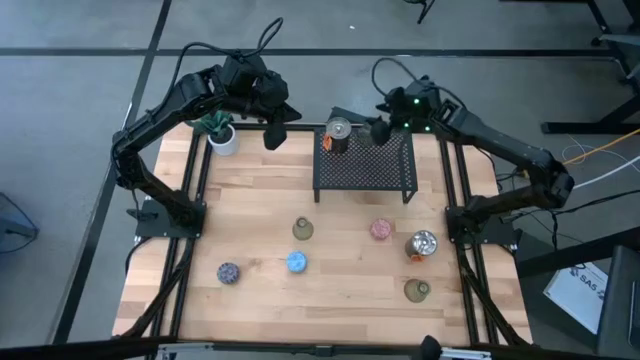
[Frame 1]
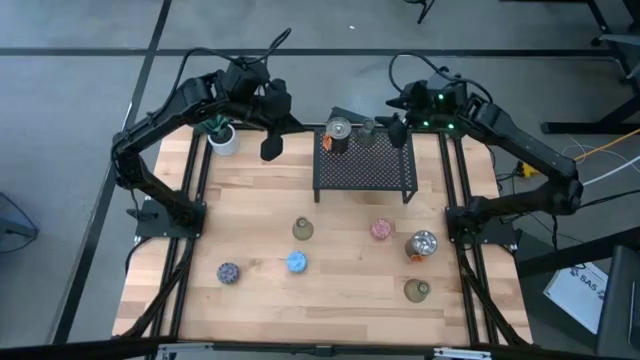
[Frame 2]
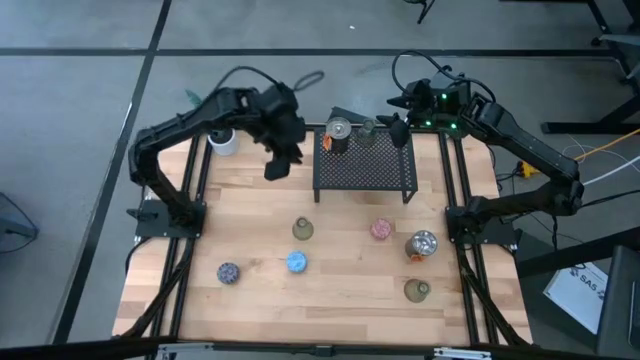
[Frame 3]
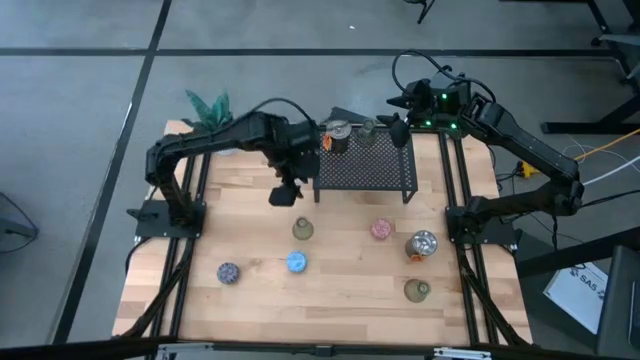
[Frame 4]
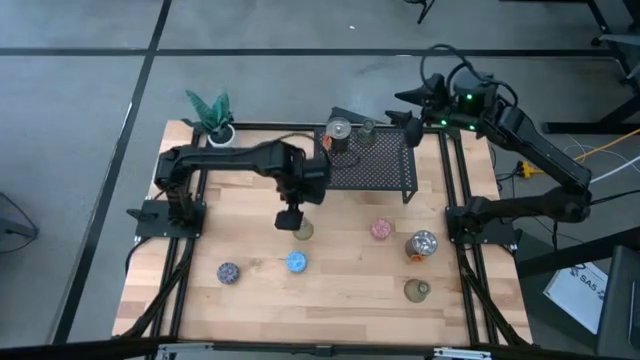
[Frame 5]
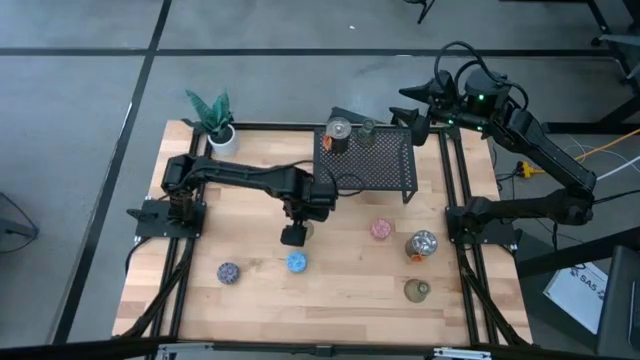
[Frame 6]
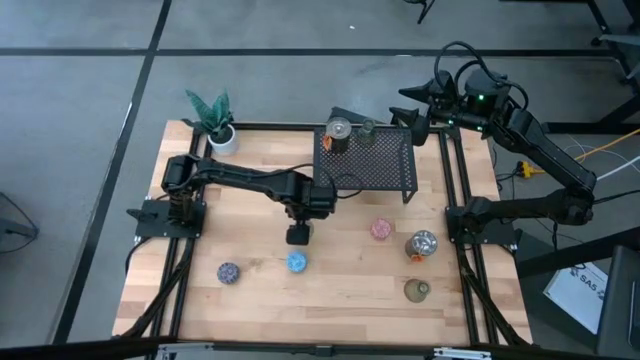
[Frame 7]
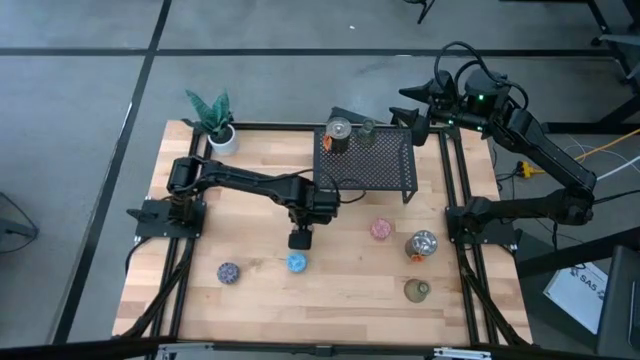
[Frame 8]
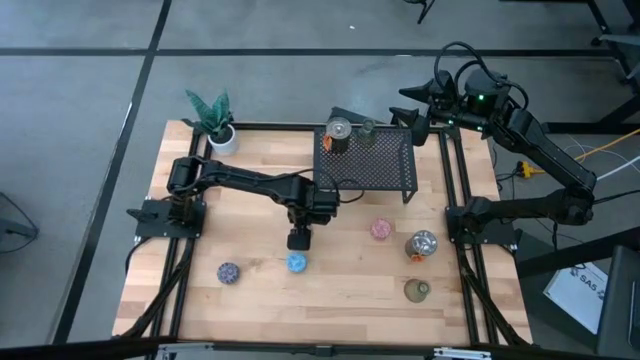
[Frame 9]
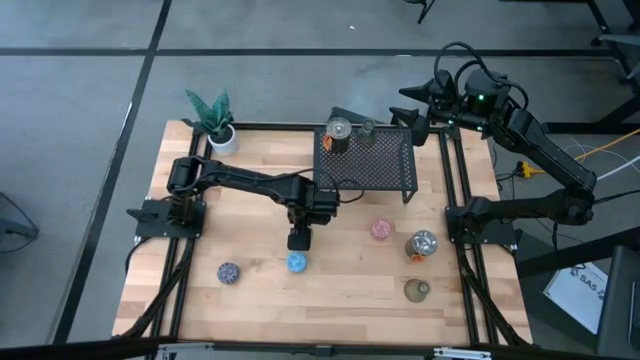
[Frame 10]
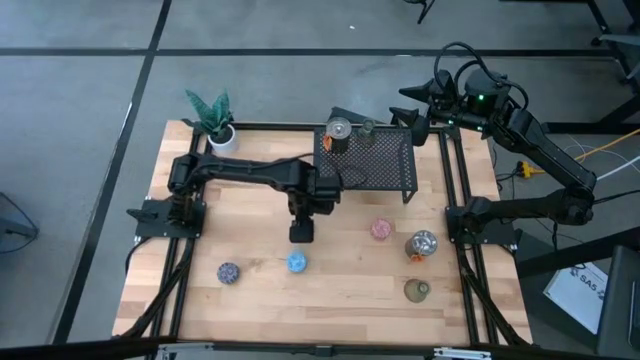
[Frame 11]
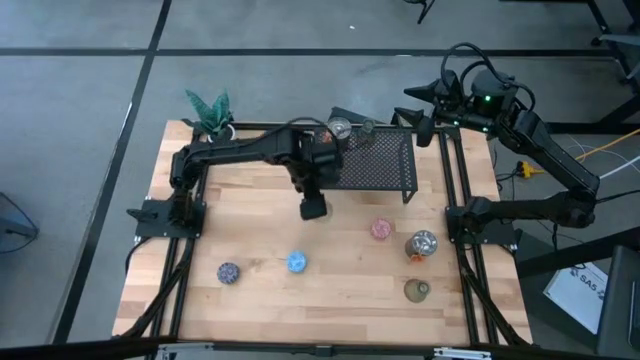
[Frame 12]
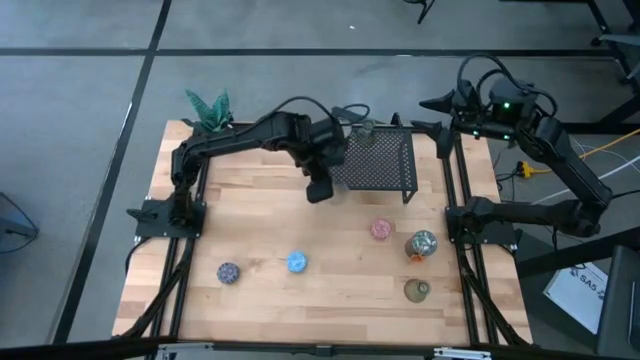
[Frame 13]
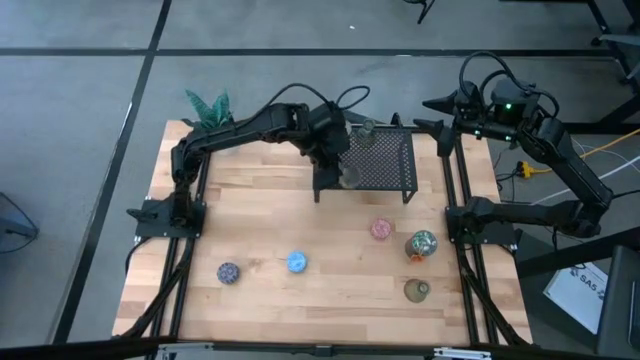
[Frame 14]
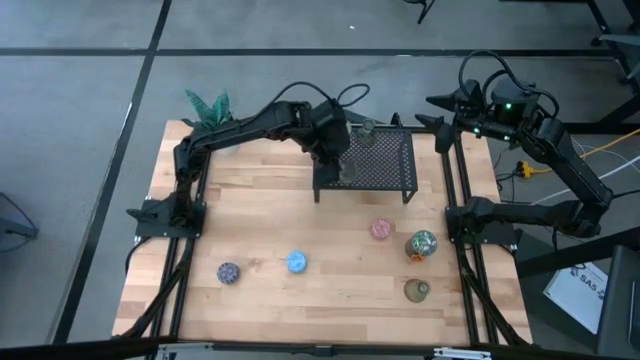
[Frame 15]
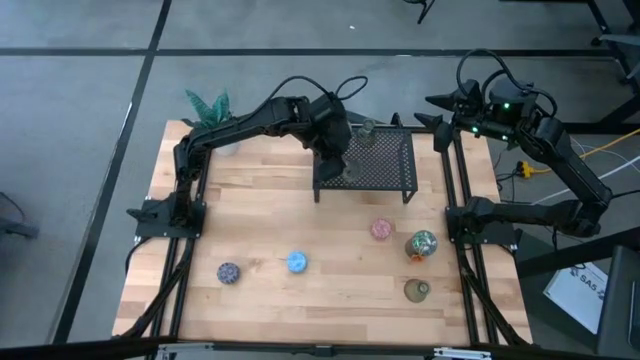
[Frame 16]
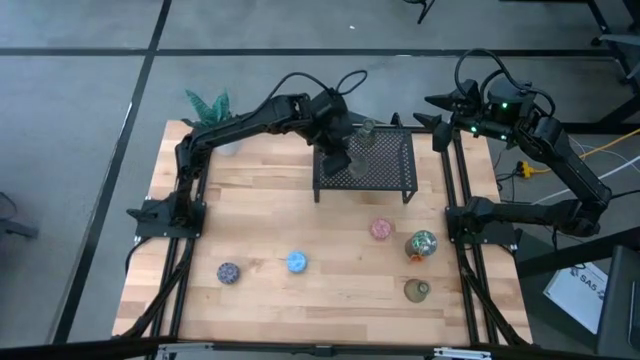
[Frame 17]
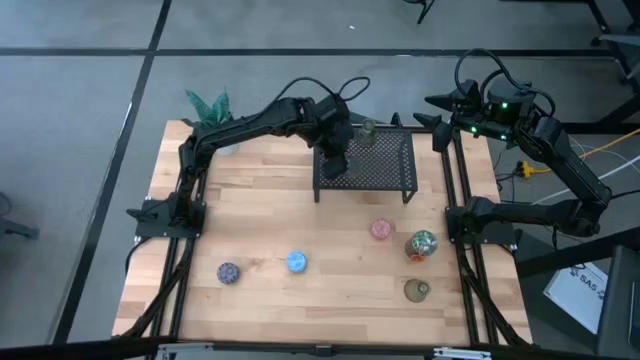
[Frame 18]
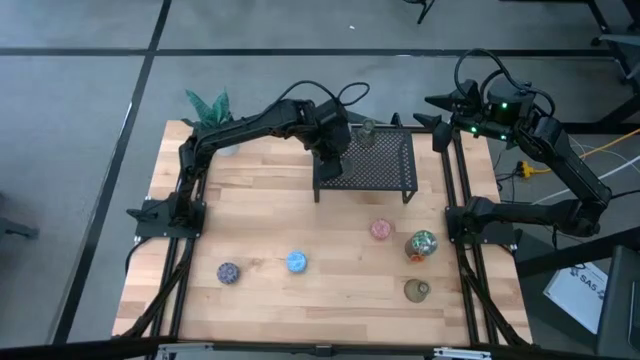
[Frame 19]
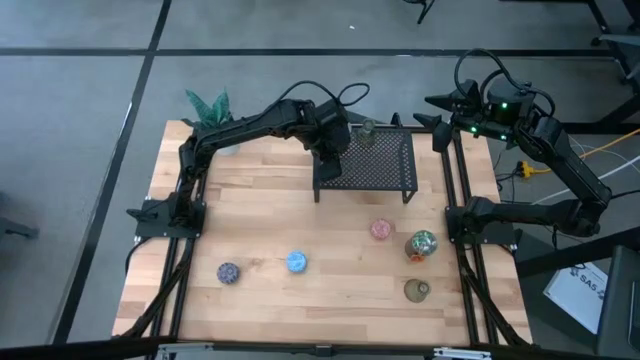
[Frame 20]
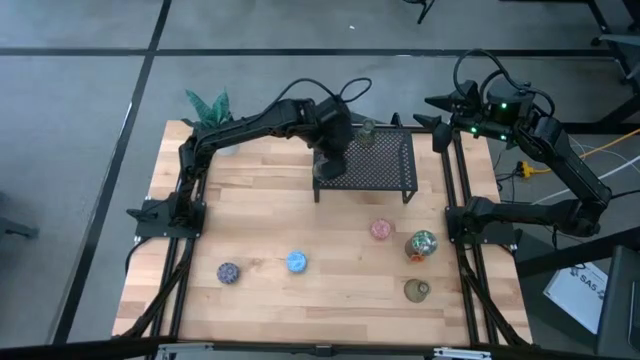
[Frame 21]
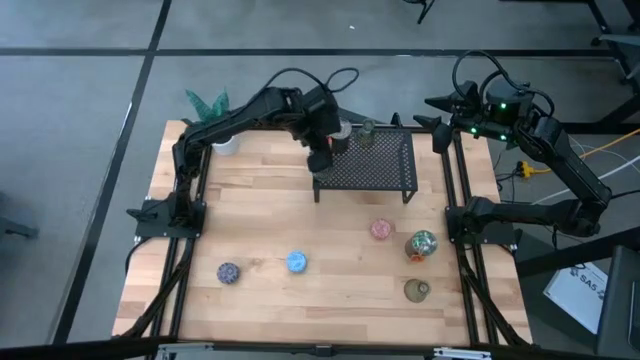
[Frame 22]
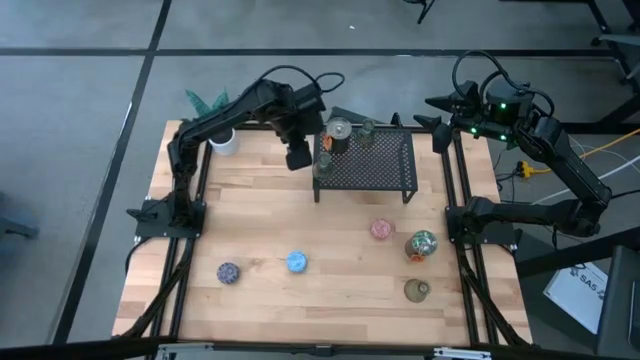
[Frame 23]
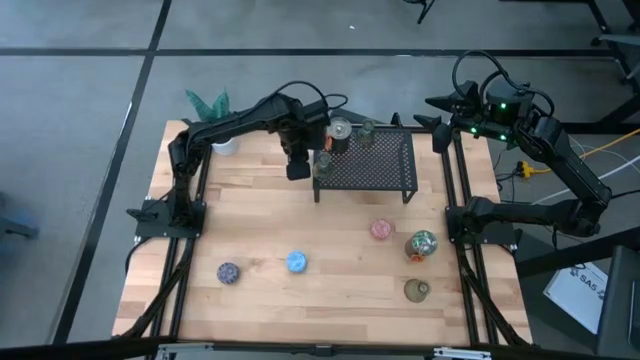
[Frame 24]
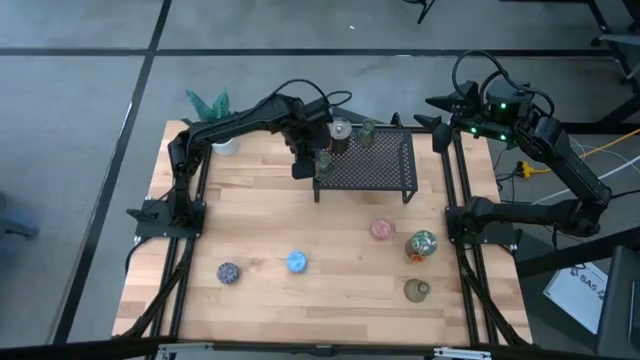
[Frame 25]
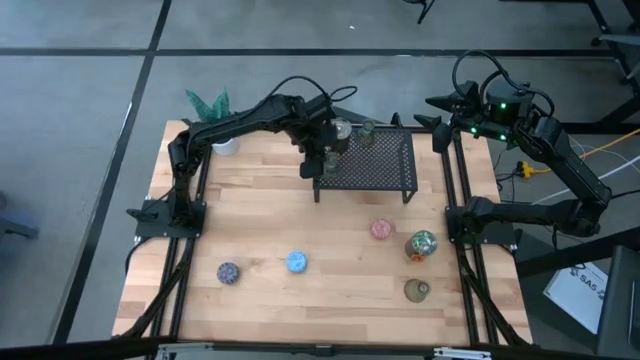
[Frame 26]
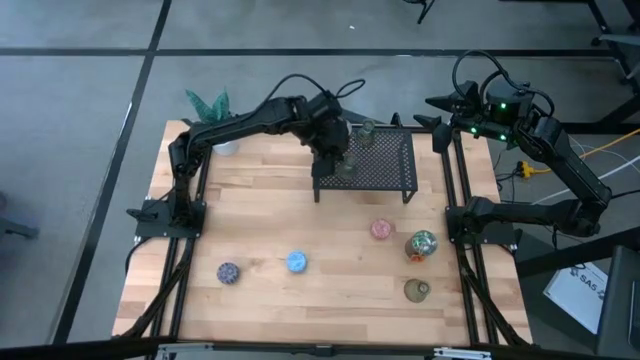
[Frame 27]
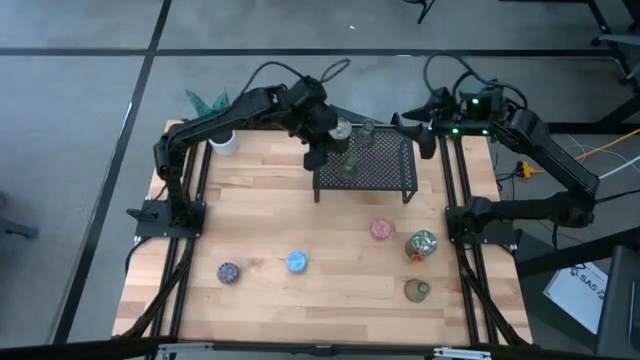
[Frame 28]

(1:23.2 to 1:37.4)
Task: Pick & Place candle stick holders
Put the top green vase candle holder on the shelf aligned with the other green vase candle holder

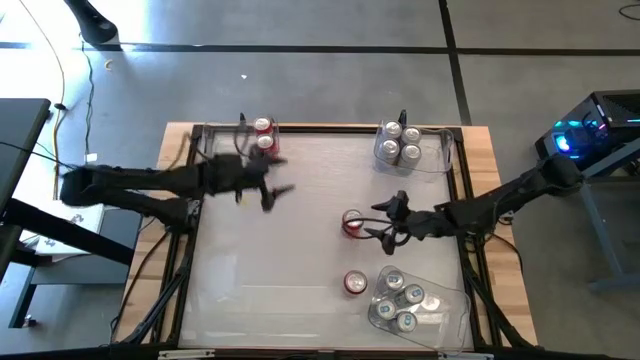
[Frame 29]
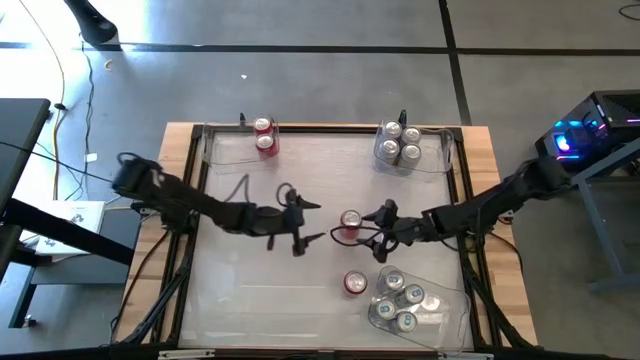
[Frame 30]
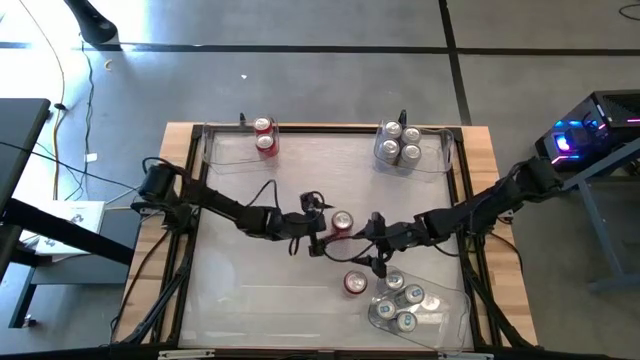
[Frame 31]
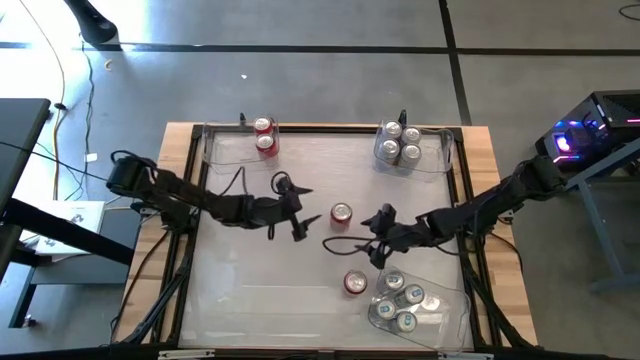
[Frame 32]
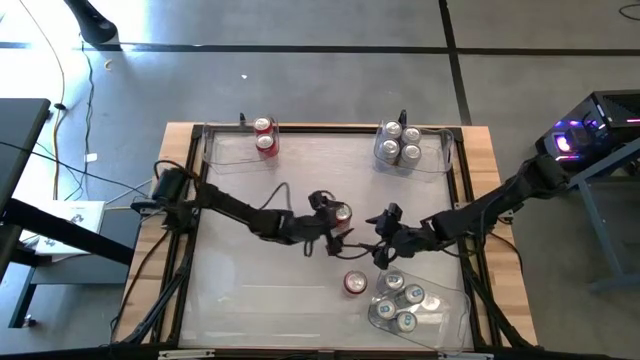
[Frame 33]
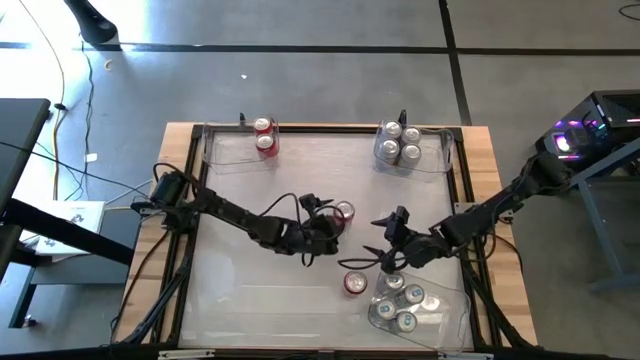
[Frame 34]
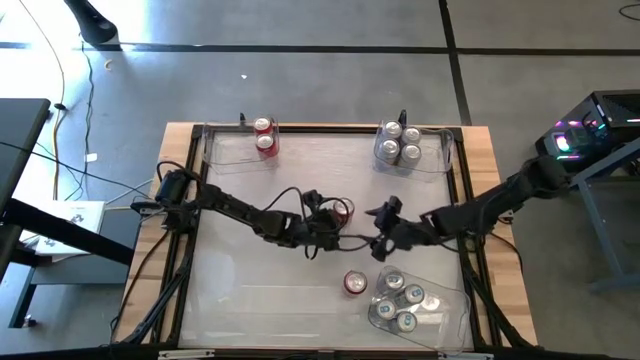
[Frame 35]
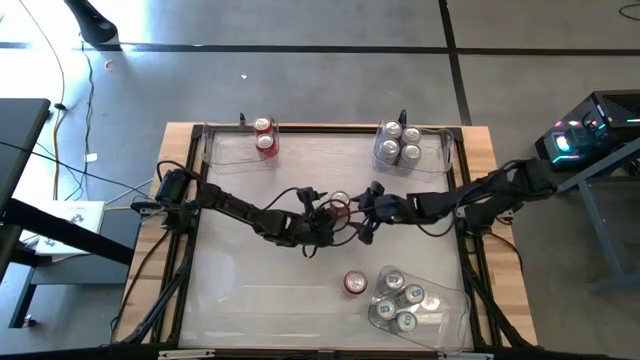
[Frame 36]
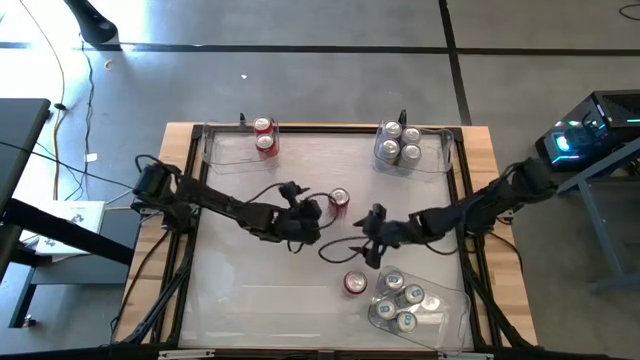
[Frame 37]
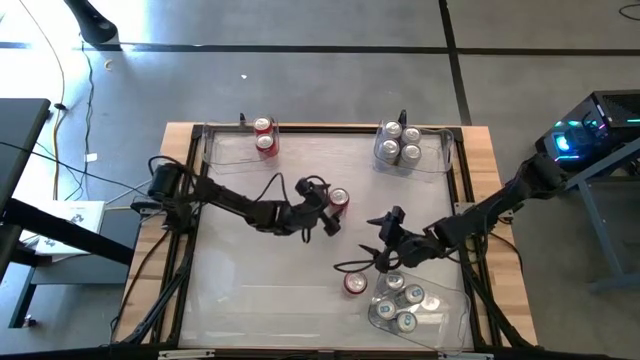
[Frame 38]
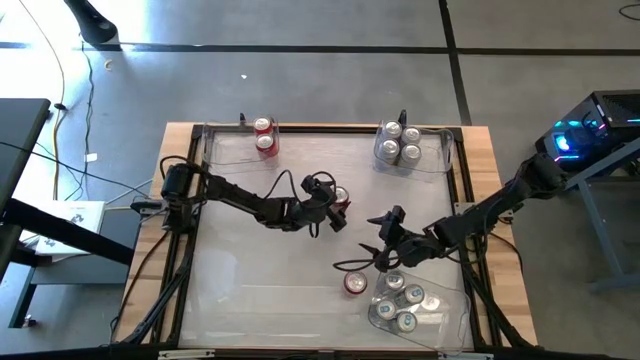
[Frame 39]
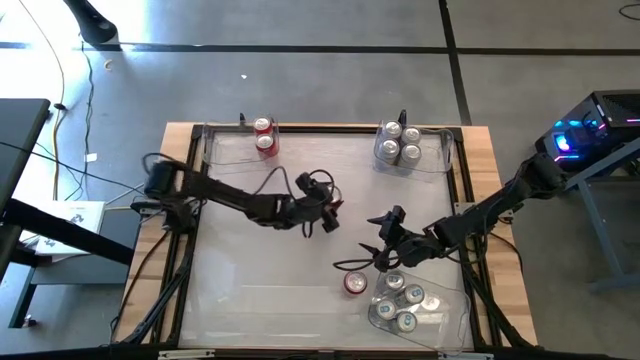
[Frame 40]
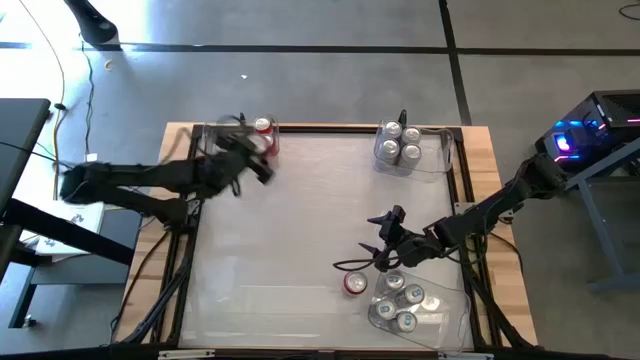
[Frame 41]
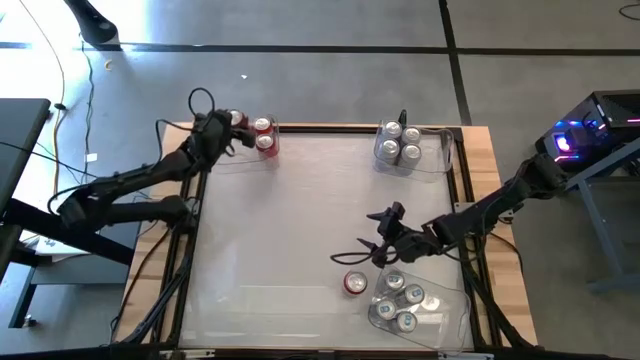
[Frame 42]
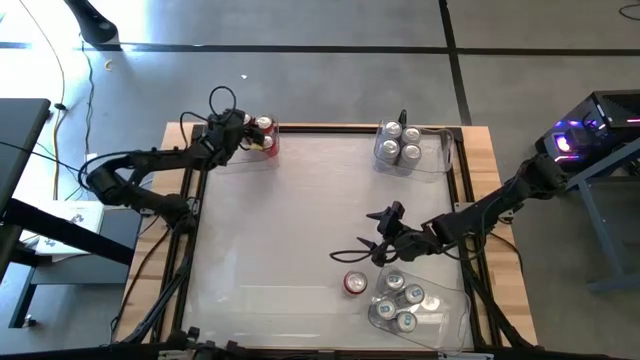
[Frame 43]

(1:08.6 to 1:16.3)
Task: Sort soda cans
Put the red soda can into the top left transparent bin
